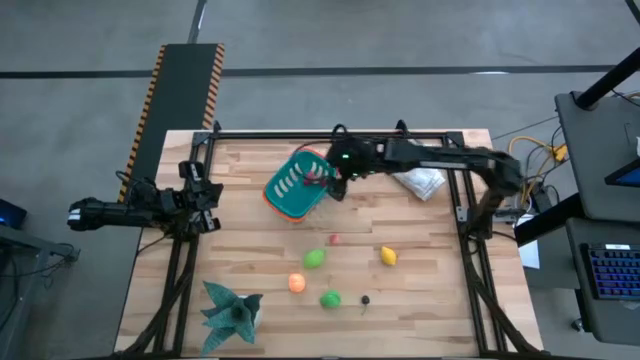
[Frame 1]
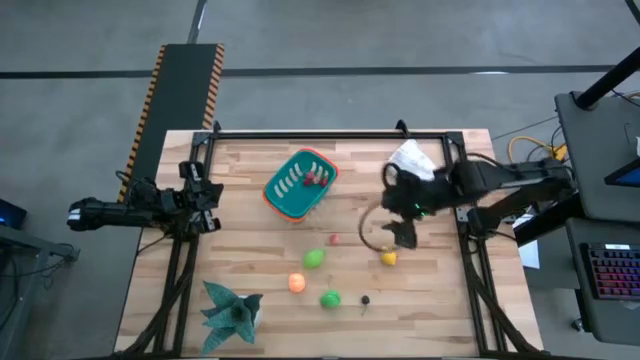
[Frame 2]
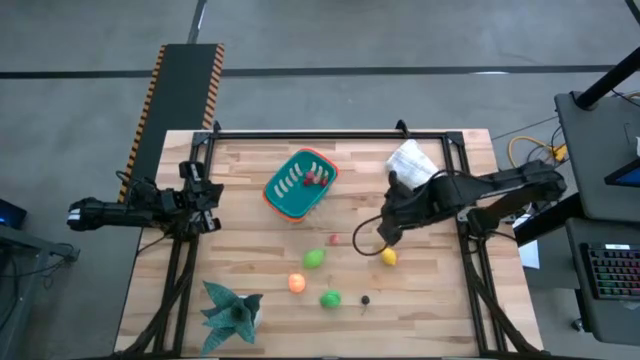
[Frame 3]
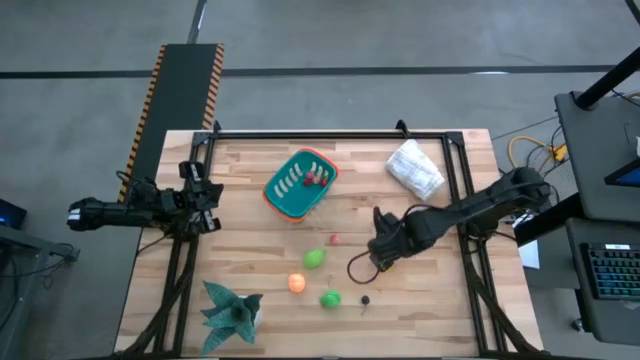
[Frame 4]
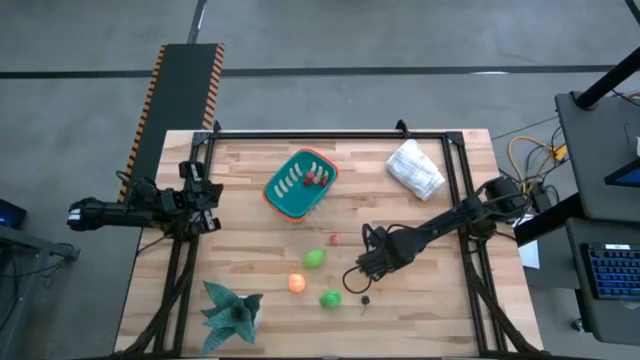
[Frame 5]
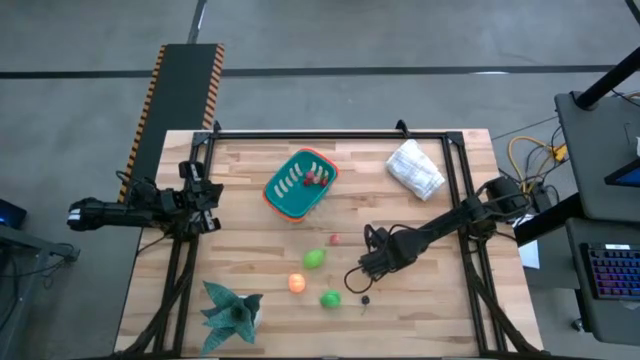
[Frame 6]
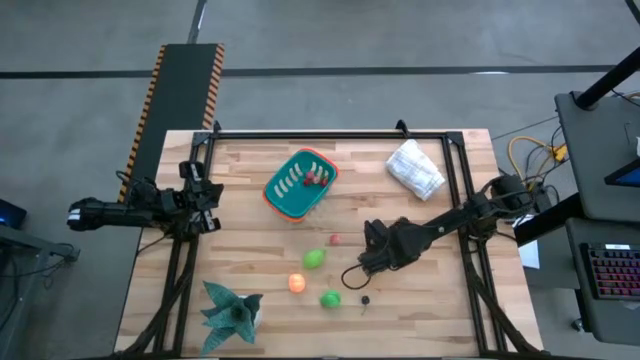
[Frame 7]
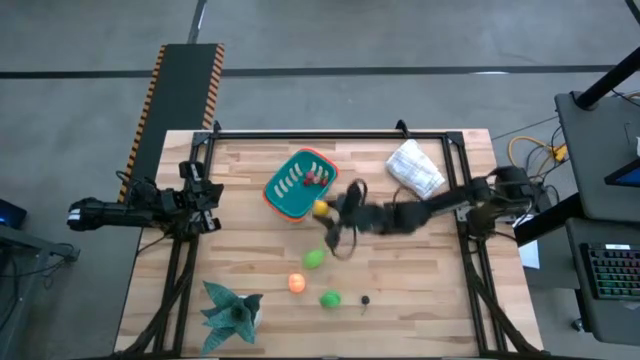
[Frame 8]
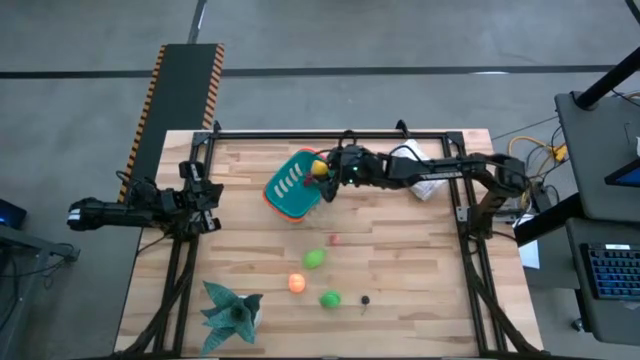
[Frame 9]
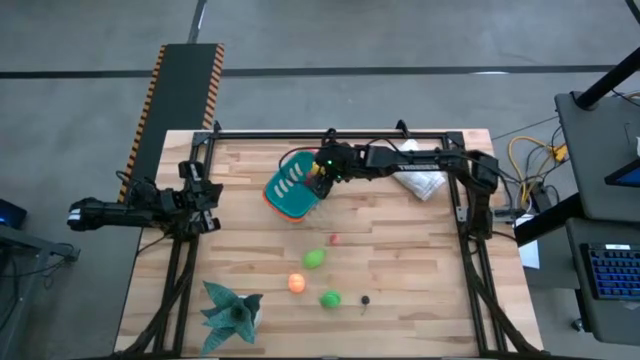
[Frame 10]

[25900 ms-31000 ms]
Task: Pick and placing Produce into tupperware
Put the yellow lemon into the blue bin

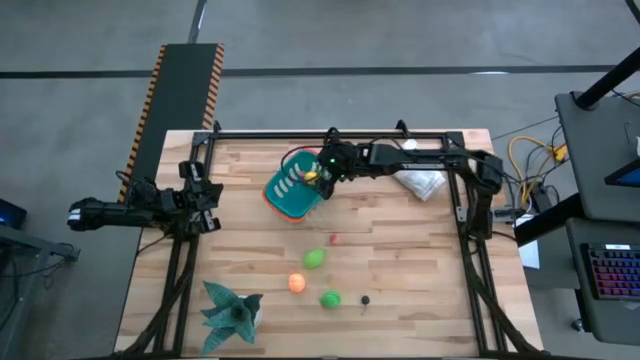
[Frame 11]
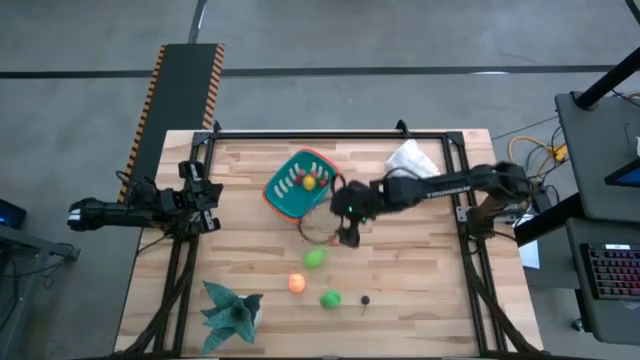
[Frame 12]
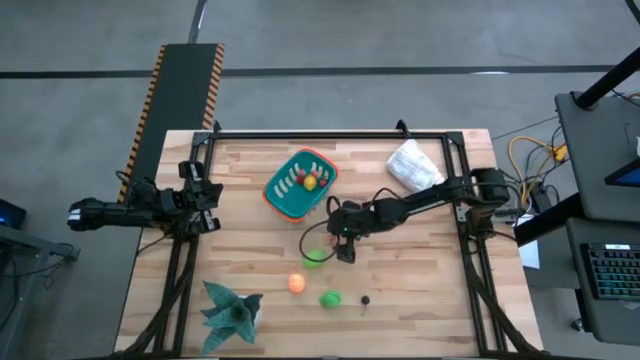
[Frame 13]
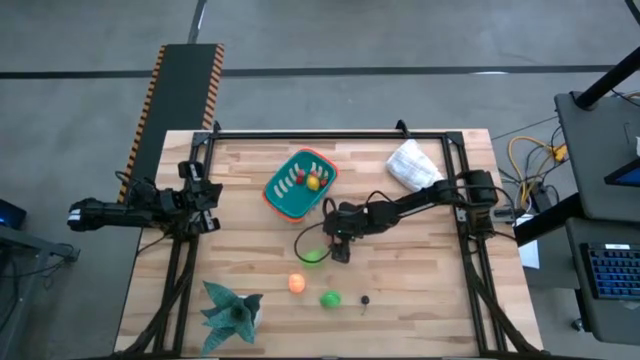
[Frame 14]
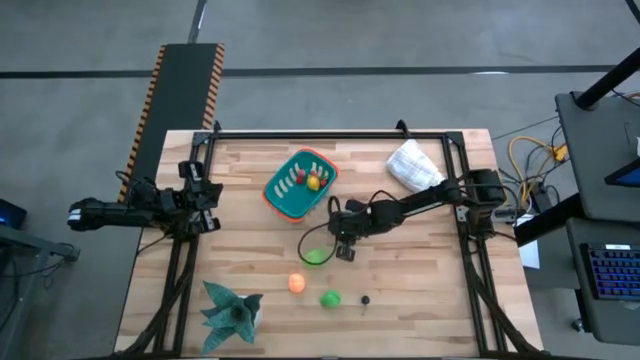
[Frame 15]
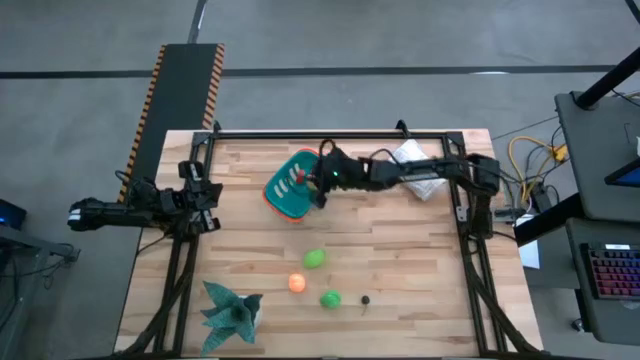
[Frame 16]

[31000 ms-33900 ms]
Put the pink peach into the blue bin

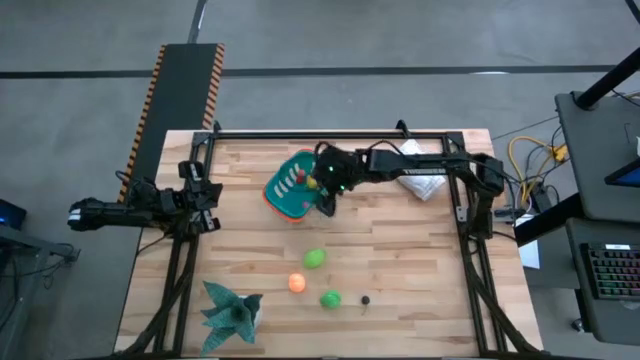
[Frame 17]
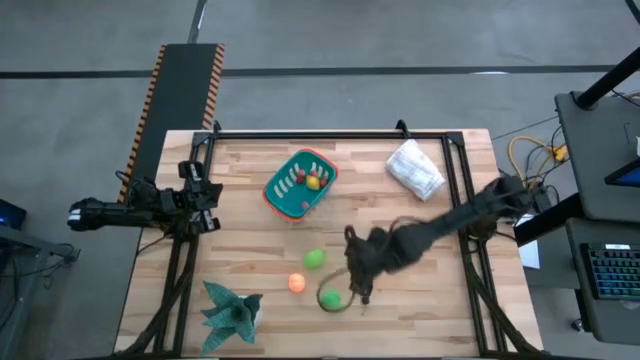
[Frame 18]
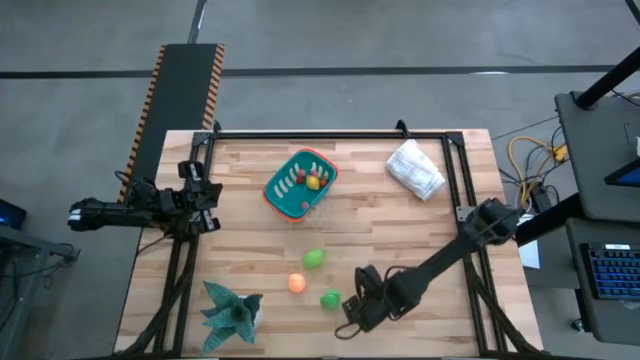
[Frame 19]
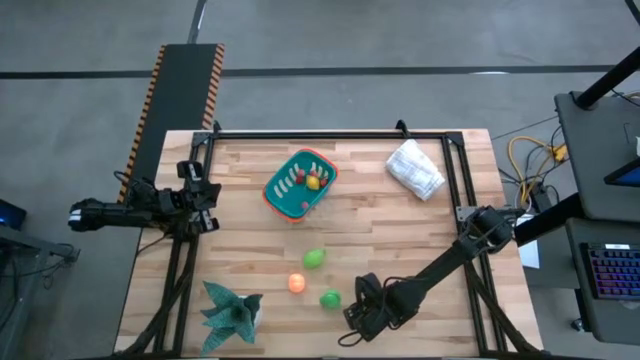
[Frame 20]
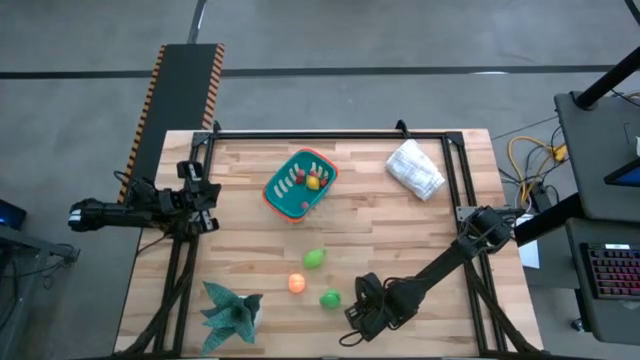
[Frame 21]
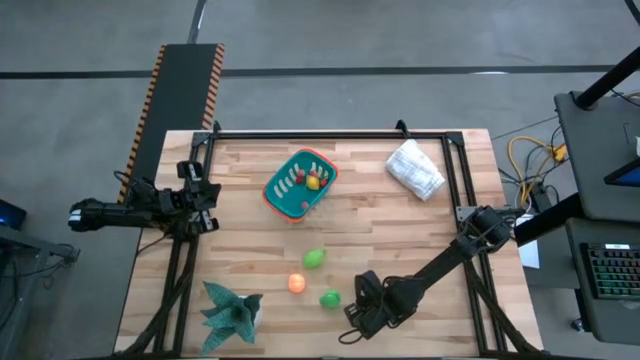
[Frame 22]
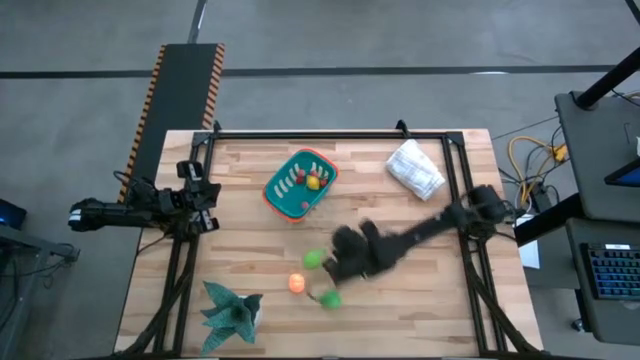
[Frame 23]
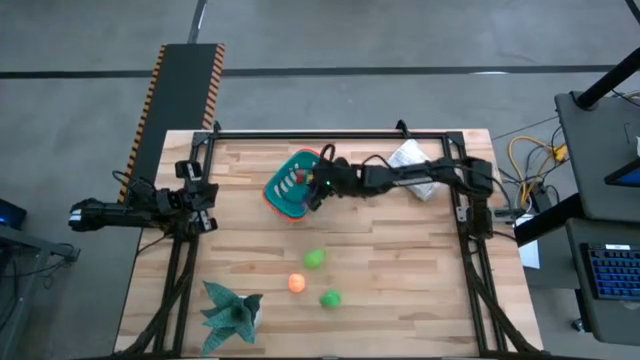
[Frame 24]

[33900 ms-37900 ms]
Put the black cherry into the blue bin

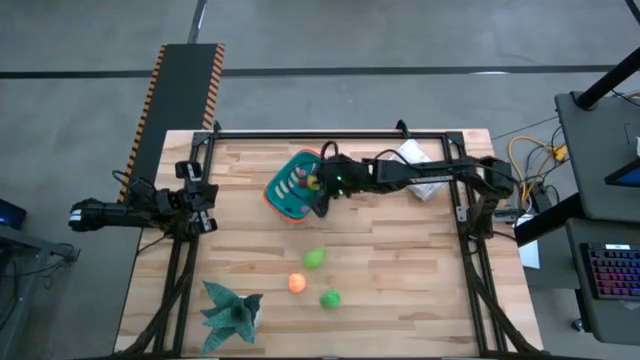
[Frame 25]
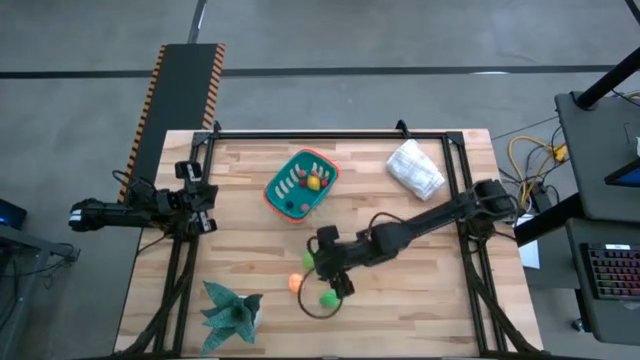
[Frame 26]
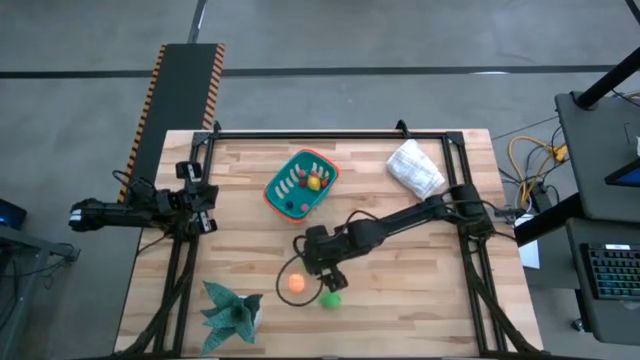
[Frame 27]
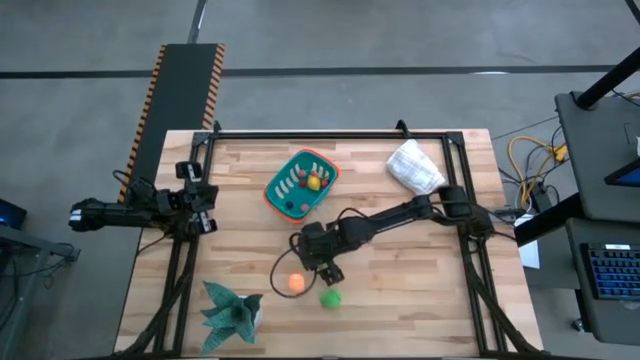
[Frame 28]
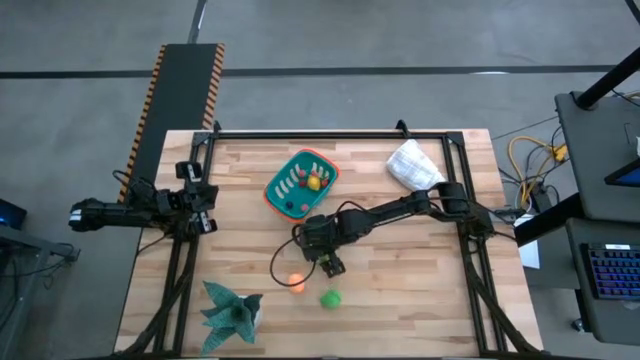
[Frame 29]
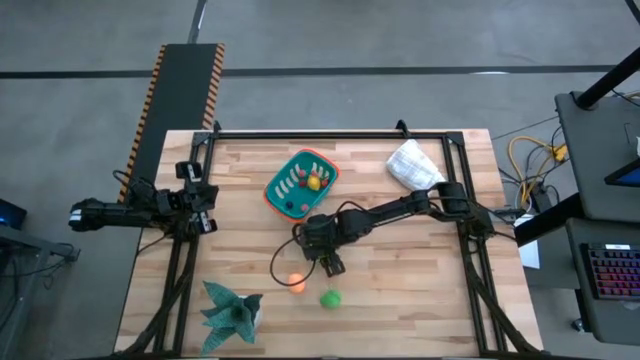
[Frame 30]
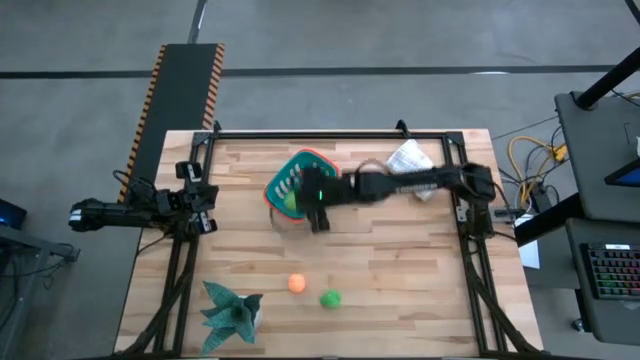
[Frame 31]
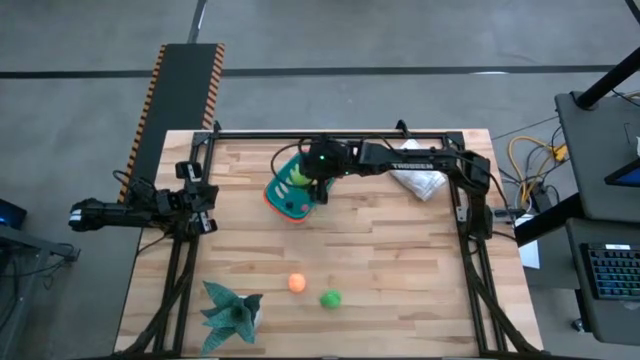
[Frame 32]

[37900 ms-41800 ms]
Put the green melon into the blue bin

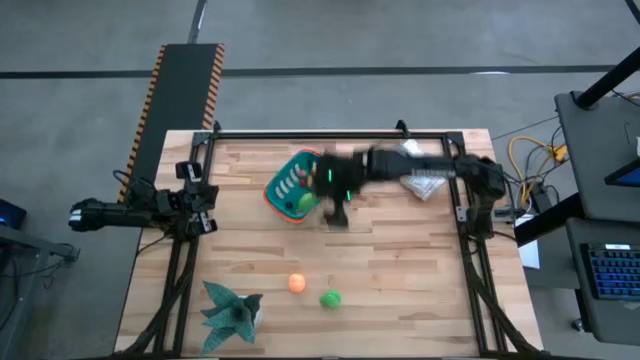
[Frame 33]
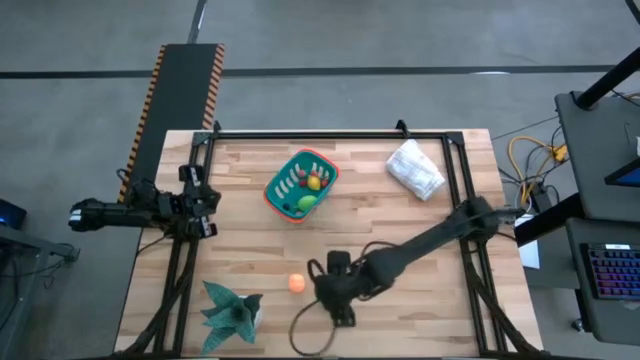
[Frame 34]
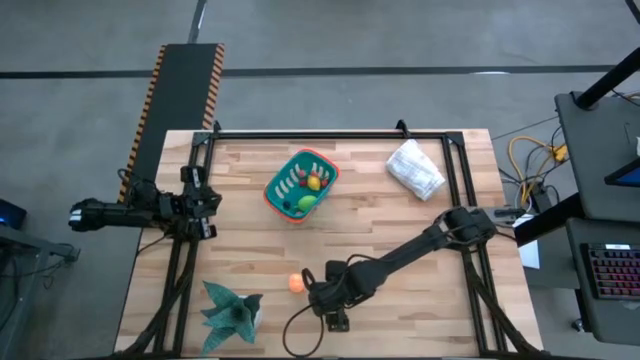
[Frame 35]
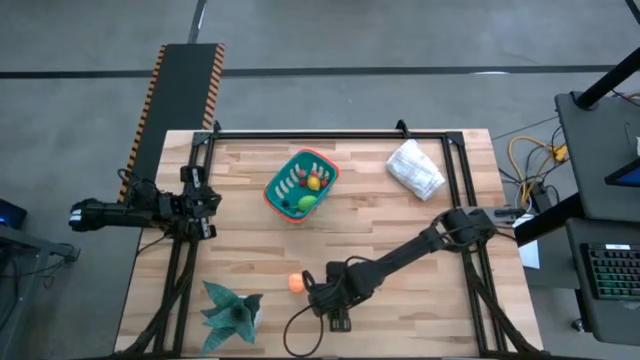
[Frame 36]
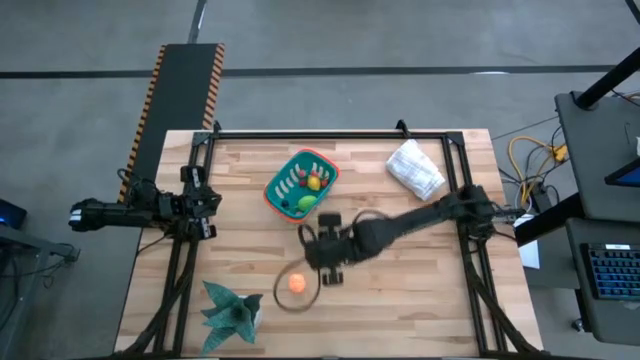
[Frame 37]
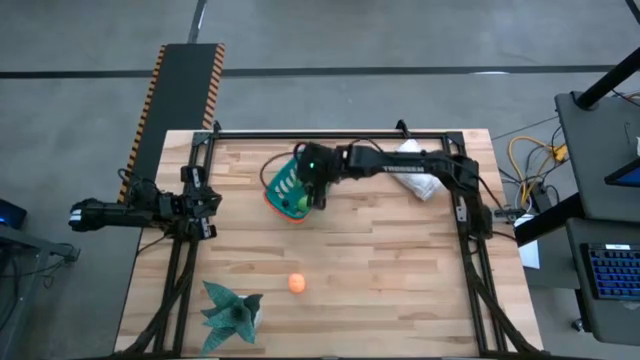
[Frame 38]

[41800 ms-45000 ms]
Put the green avocado into the blue bin

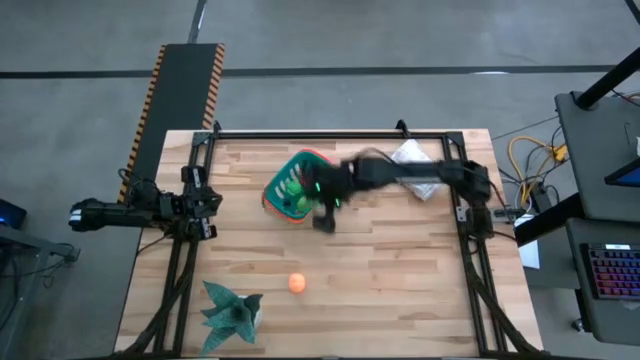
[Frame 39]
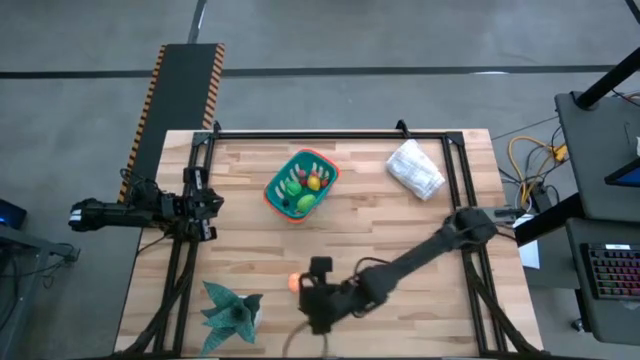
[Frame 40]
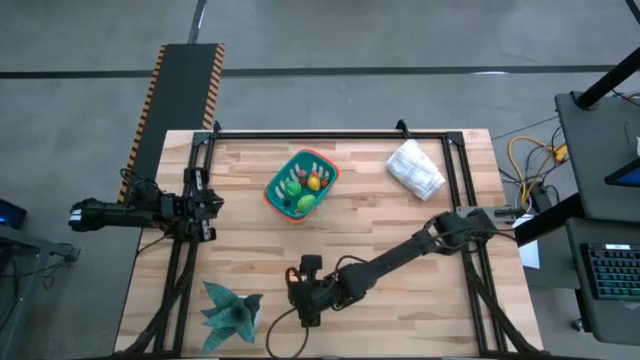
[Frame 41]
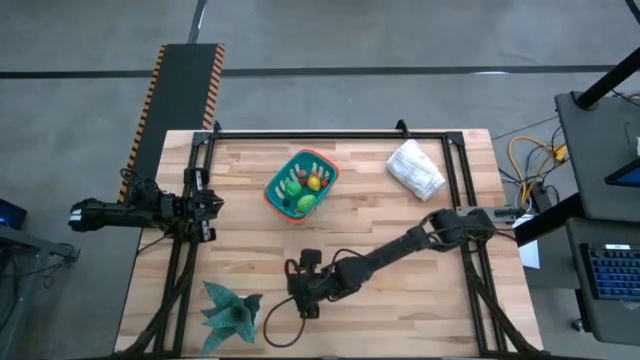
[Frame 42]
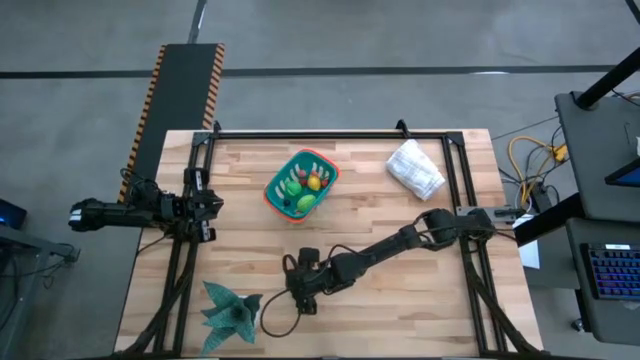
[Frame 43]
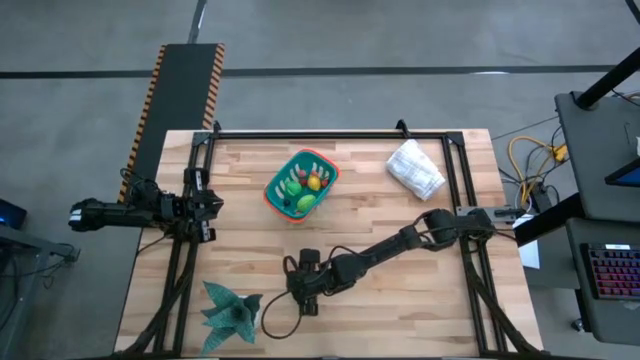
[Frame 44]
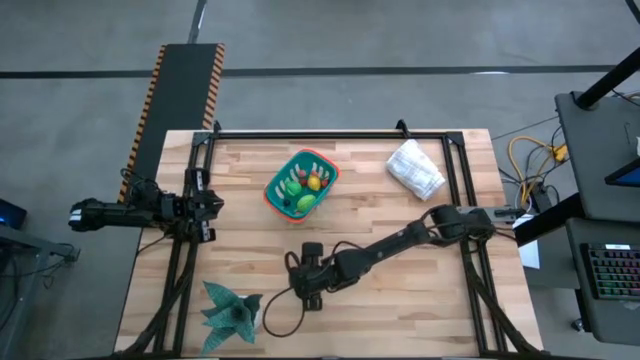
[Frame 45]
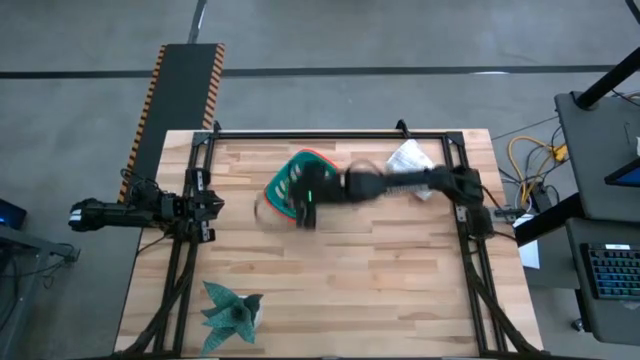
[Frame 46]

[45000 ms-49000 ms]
Put the big light orange peach into the blue bin
